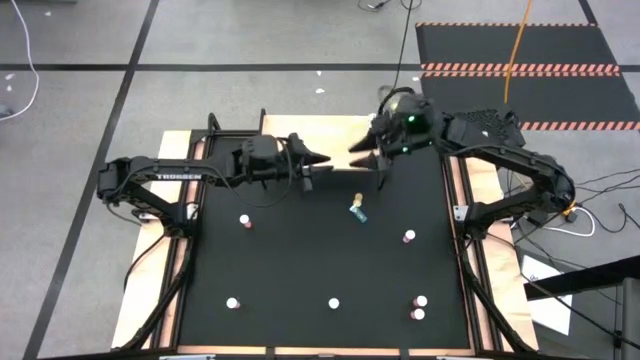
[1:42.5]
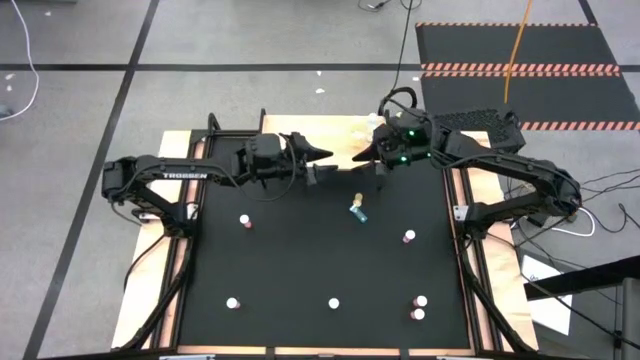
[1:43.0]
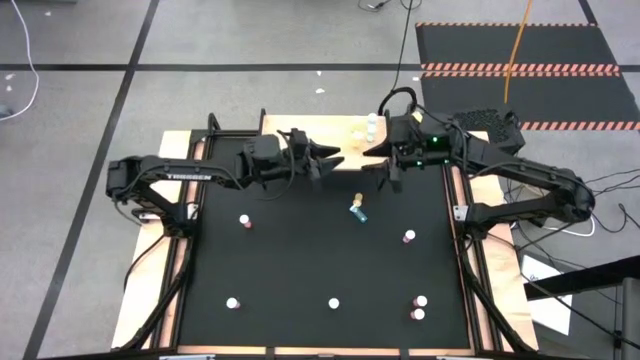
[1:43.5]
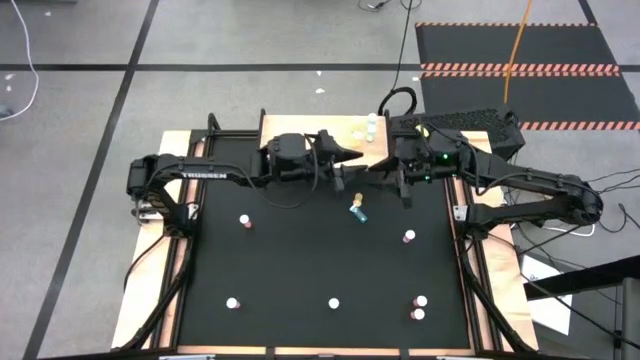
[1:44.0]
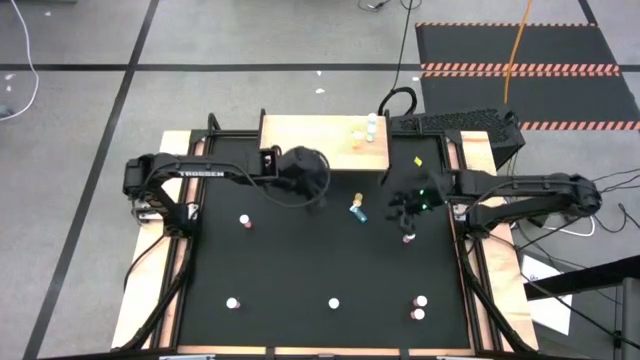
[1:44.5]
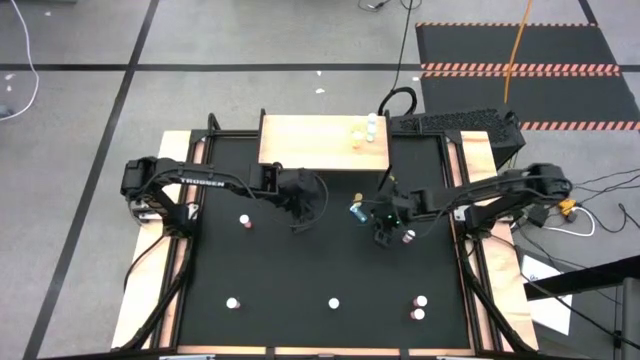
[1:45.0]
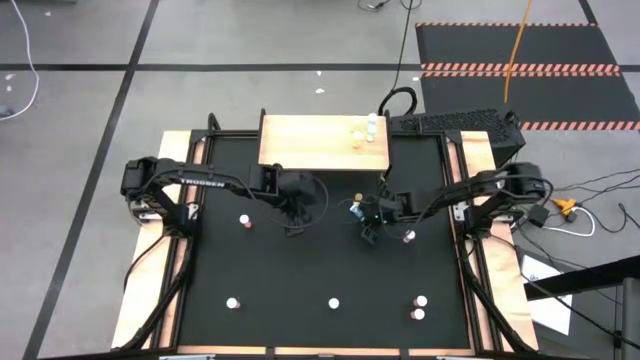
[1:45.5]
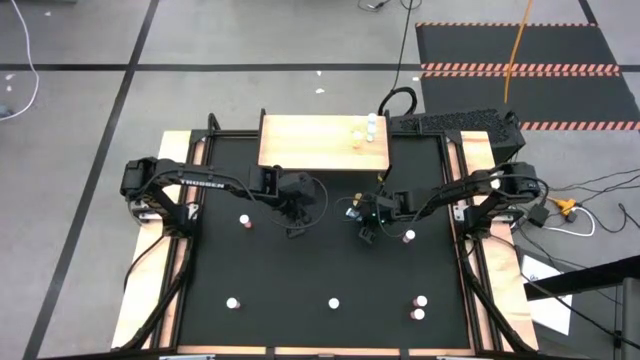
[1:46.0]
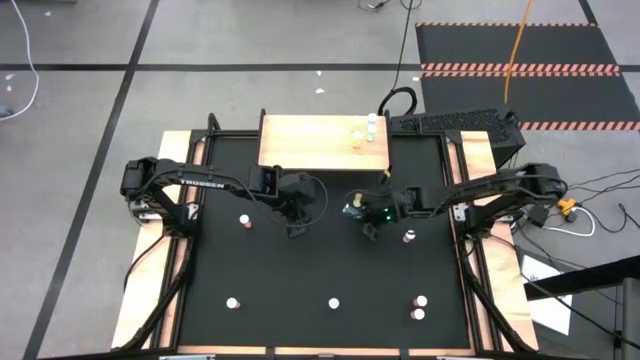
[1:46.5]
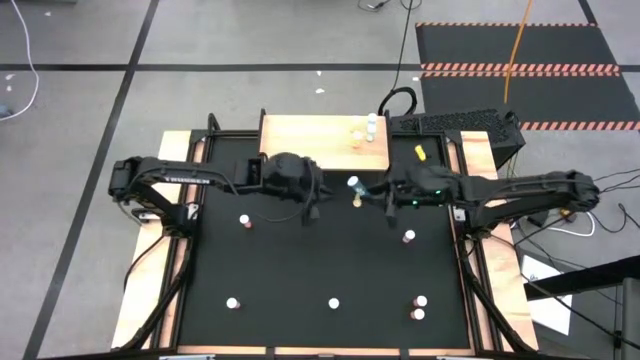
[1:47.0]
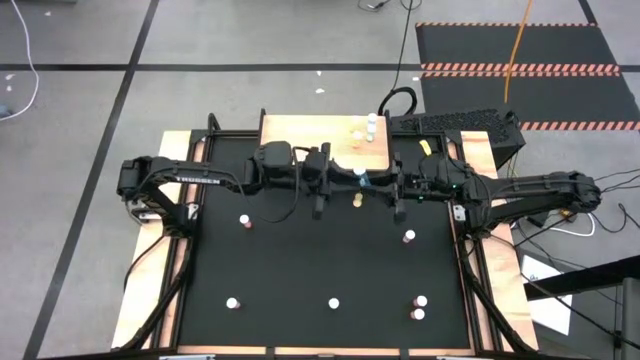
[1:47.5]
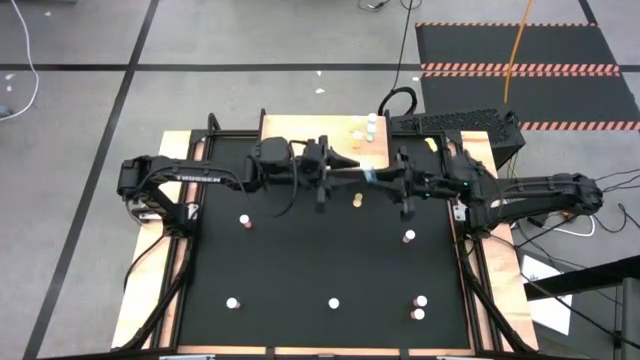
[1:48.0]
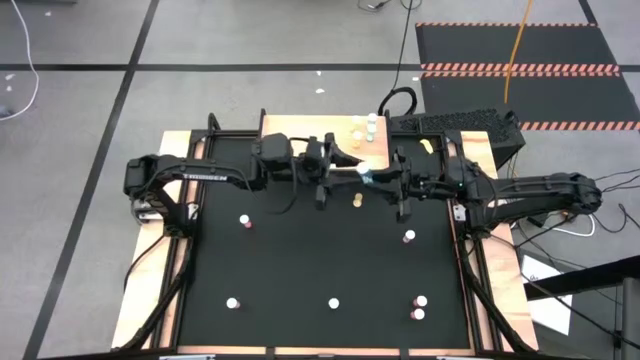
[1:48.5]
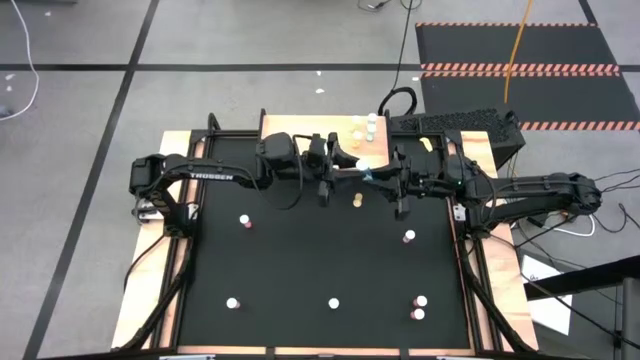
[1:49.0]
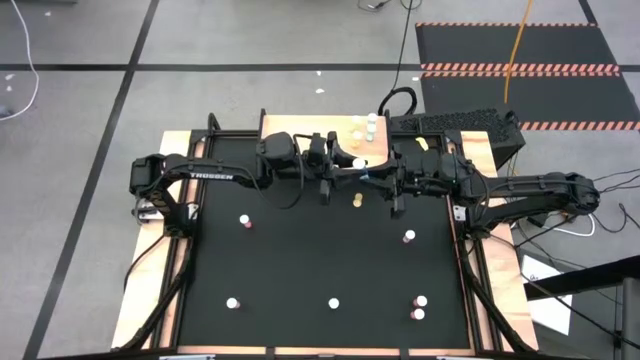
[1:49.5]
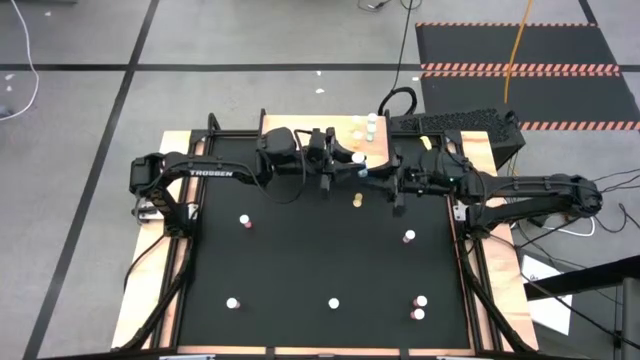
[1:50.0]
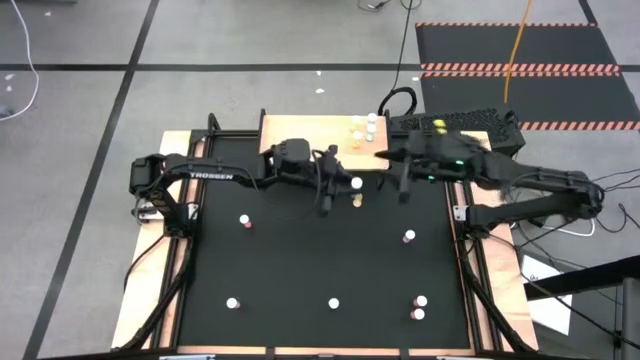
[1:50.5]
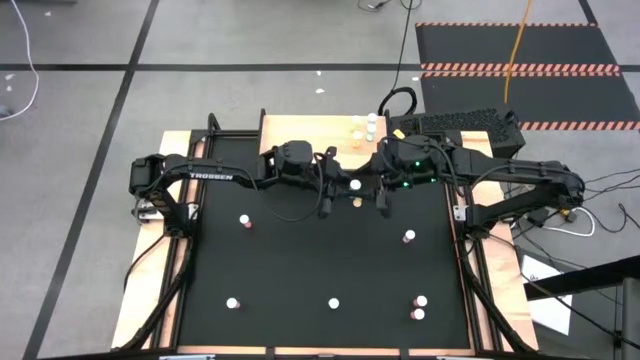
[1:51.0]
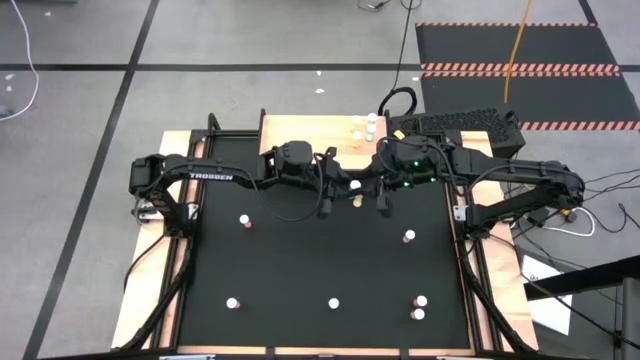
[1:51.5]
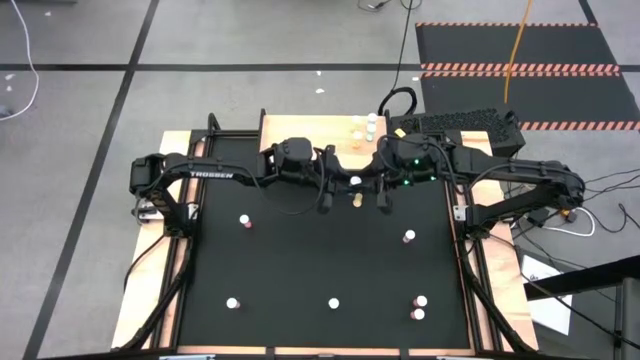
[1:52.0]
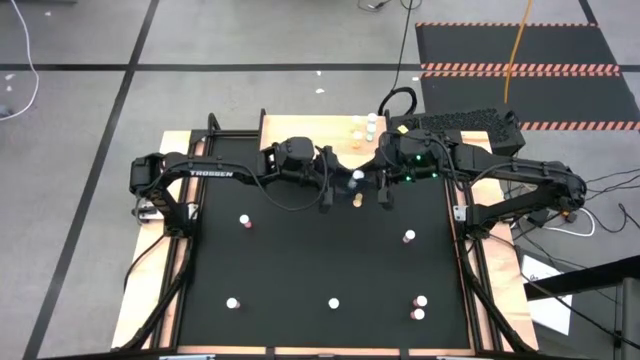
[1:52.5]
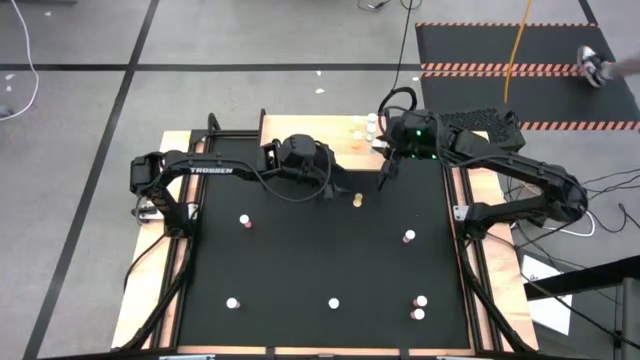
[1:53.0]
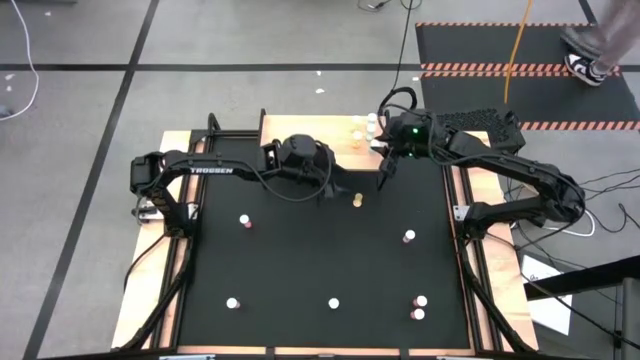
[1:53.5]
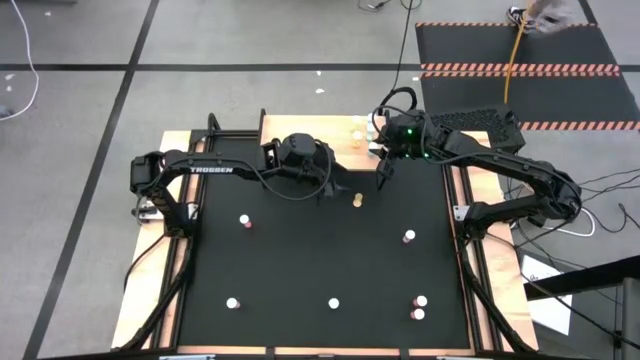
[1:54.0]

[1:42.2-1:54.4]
Task: Pick and place medicine bottles onto shelf by color
Put the blue pill bottle on the shelf aligned with the other blue pill bottles

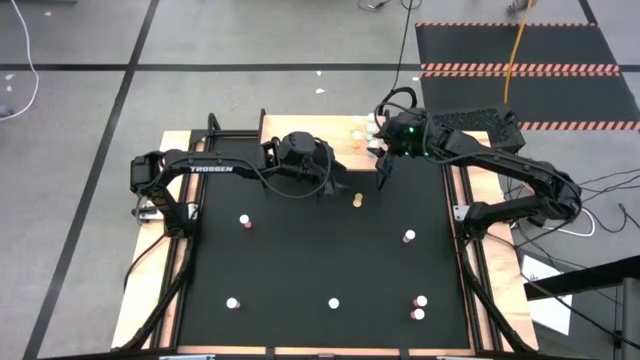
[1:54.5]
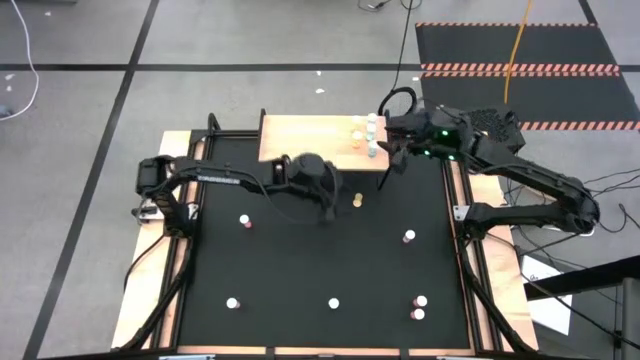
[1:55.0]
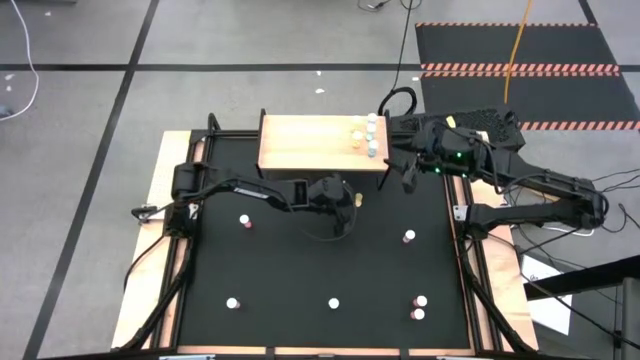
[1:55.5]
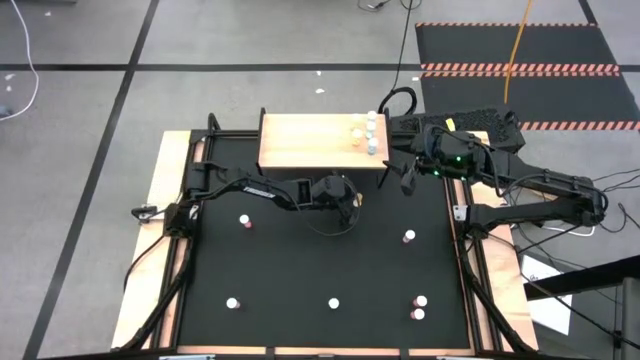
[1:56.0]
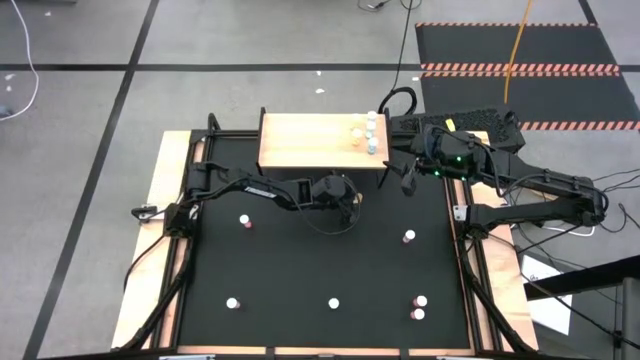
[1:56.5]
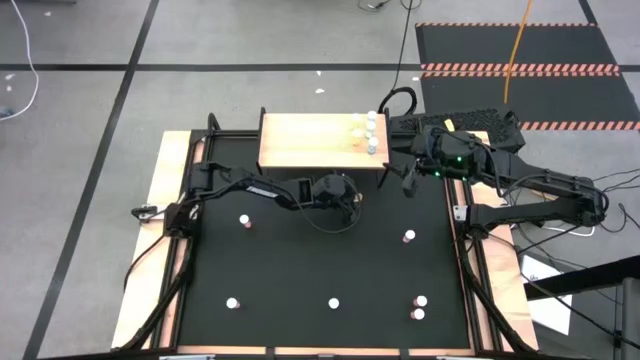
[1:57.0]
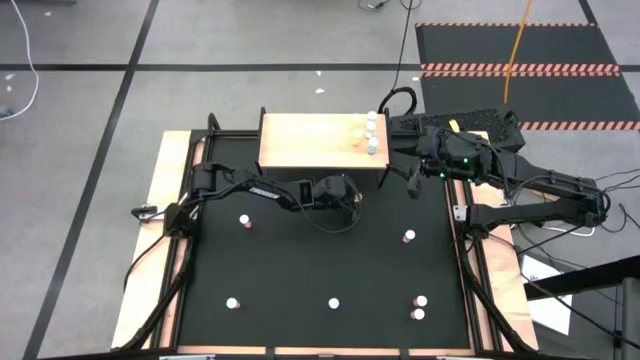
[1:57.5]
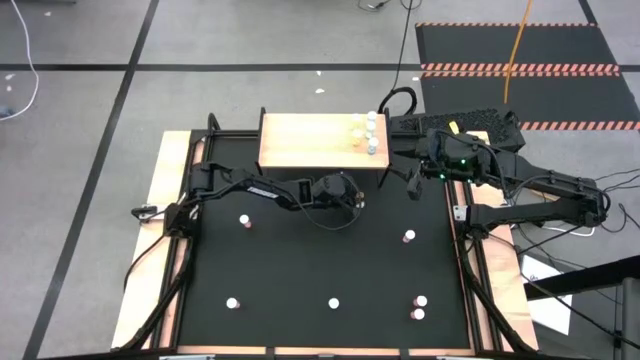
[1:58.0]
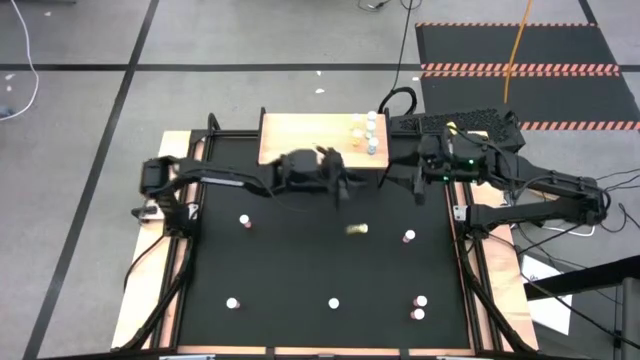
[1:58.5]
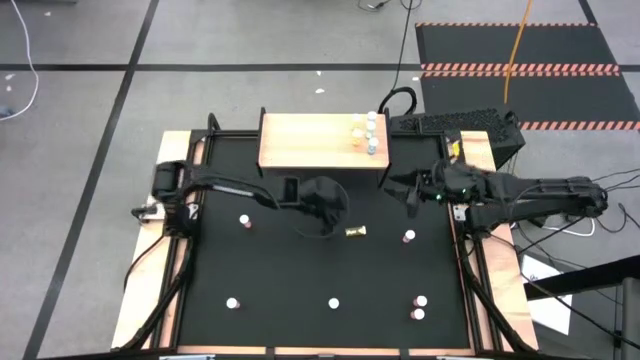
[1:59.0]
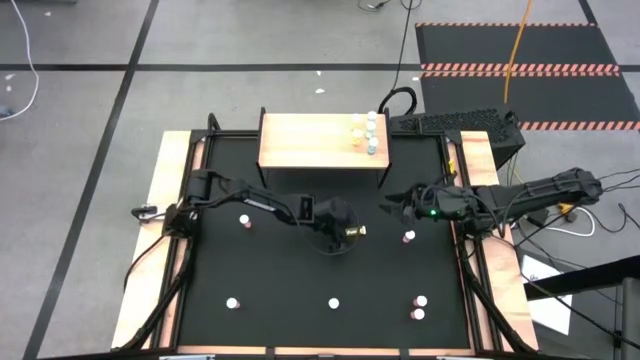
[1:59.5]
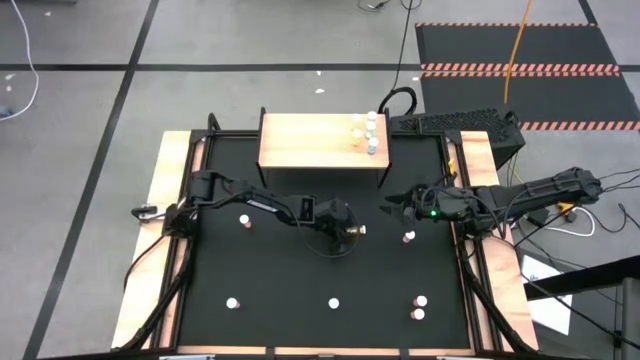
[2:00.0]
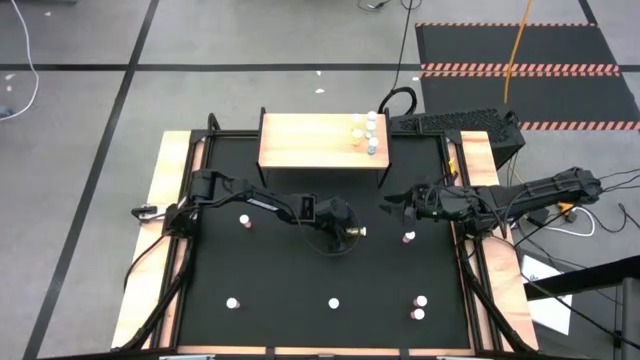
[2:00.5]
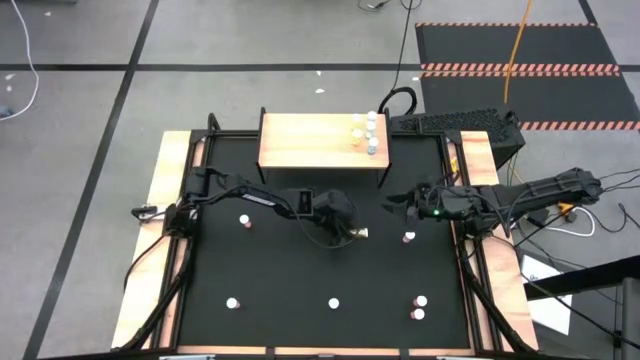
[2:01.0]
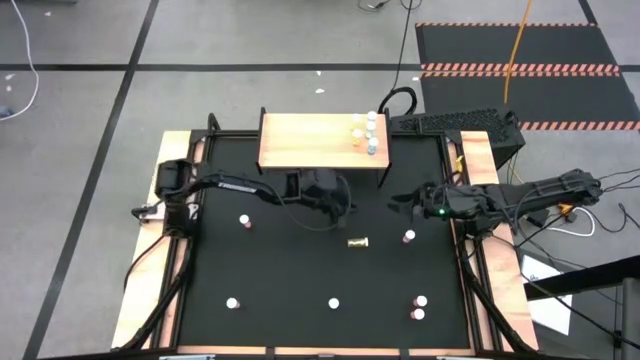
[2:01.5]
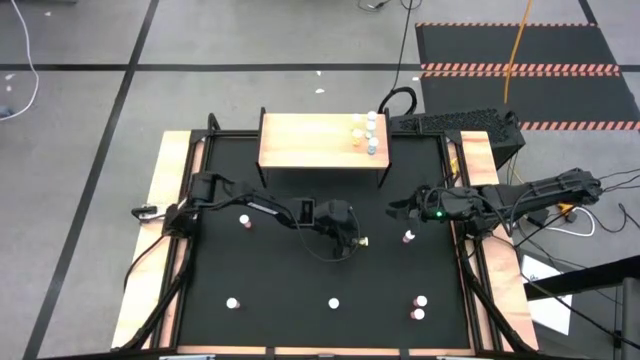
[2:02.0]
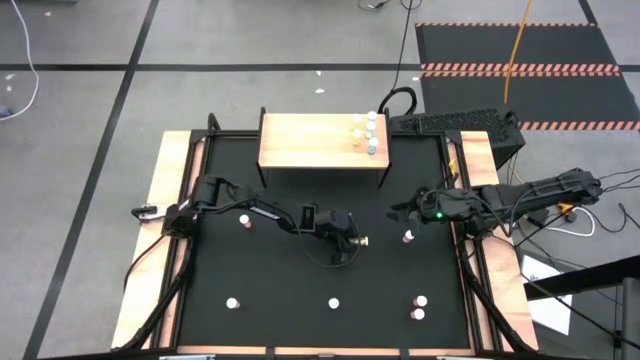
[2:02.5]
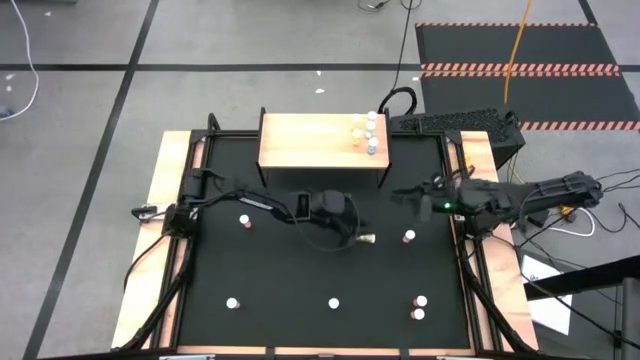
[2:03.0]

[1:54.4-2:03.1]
Put the yellow pill bottle on the shelf aligned with the other yellow pill bottles
